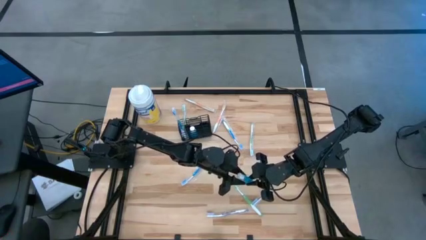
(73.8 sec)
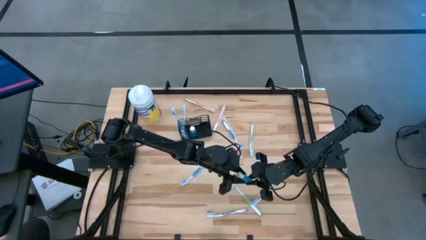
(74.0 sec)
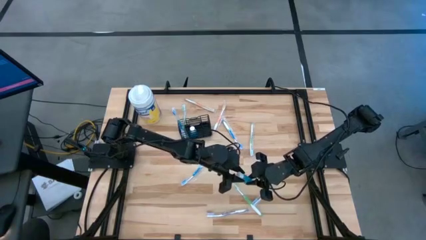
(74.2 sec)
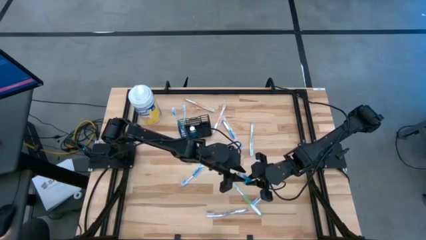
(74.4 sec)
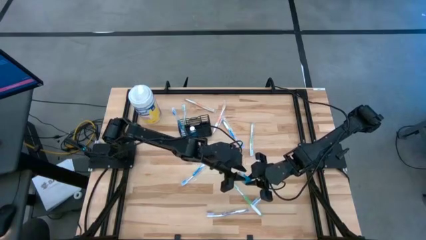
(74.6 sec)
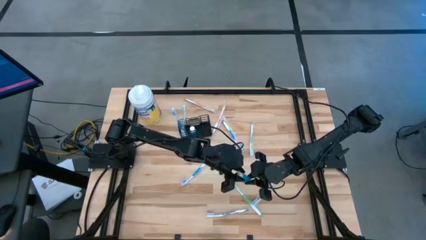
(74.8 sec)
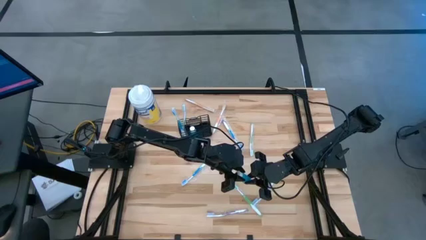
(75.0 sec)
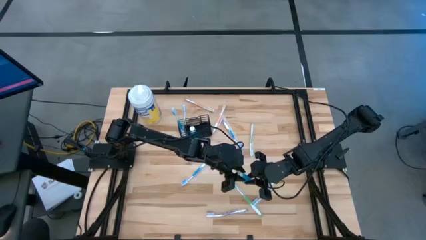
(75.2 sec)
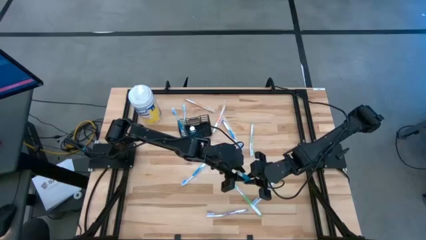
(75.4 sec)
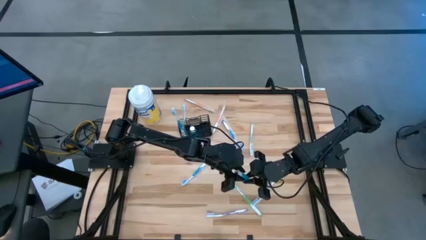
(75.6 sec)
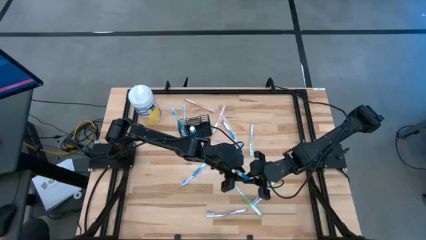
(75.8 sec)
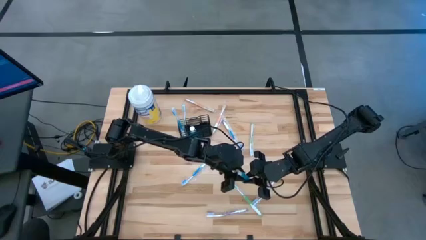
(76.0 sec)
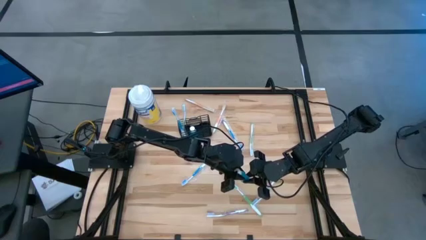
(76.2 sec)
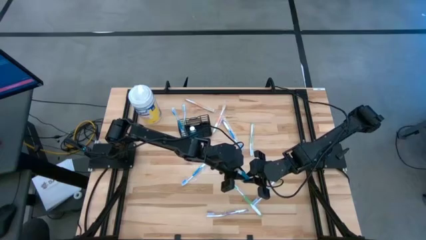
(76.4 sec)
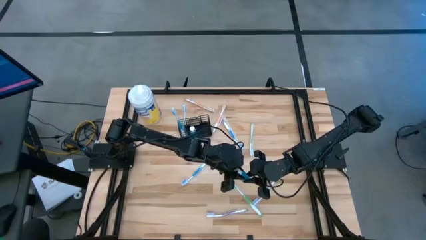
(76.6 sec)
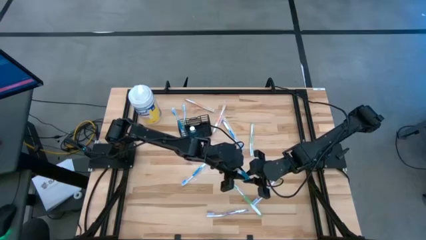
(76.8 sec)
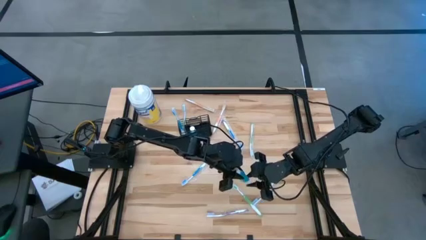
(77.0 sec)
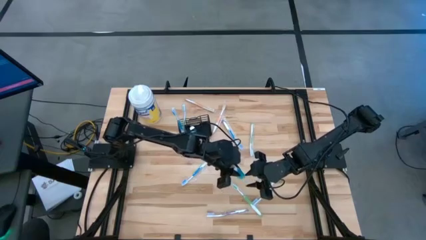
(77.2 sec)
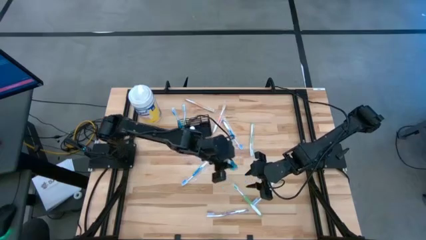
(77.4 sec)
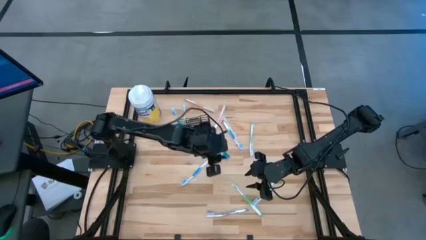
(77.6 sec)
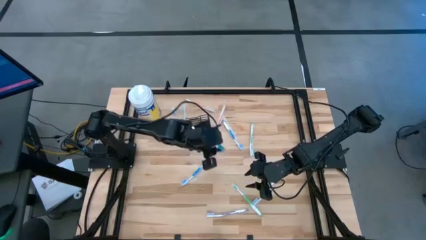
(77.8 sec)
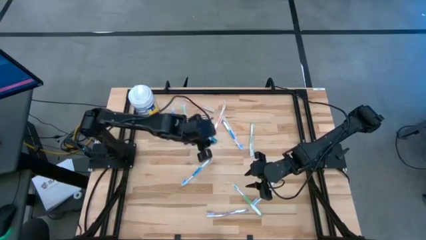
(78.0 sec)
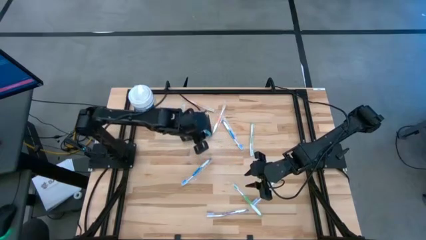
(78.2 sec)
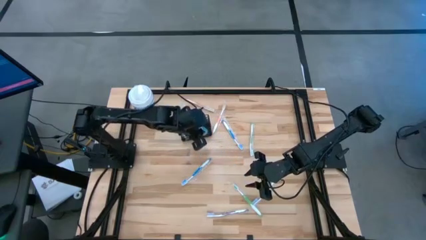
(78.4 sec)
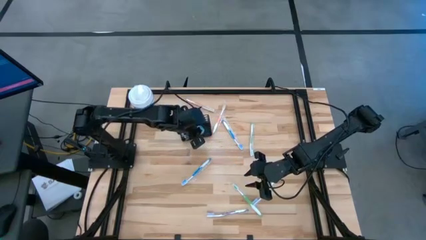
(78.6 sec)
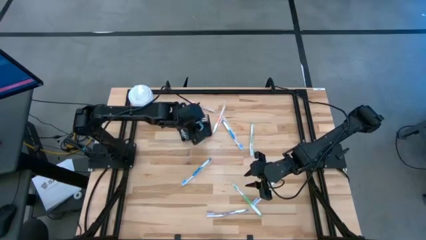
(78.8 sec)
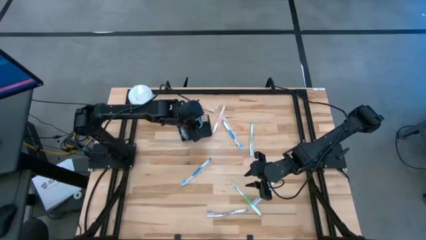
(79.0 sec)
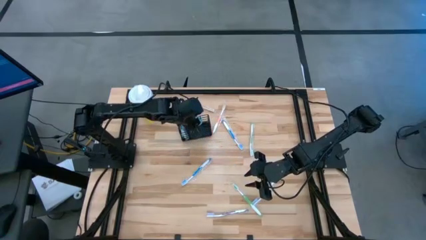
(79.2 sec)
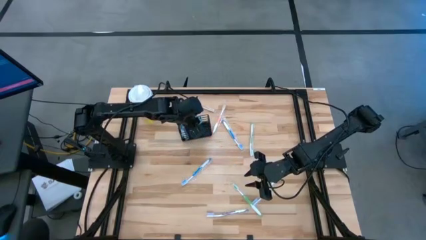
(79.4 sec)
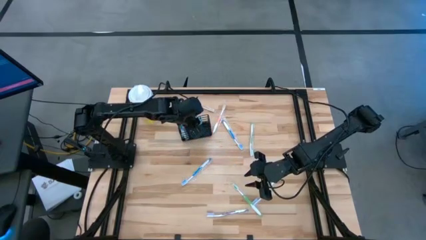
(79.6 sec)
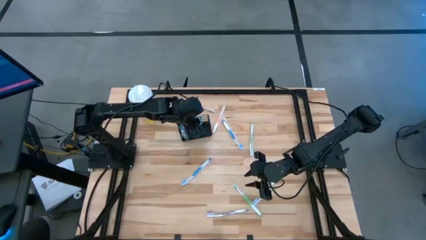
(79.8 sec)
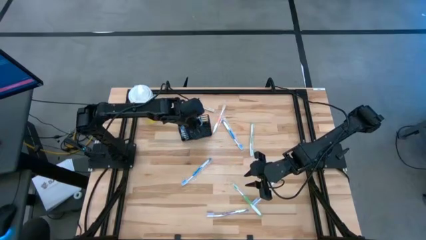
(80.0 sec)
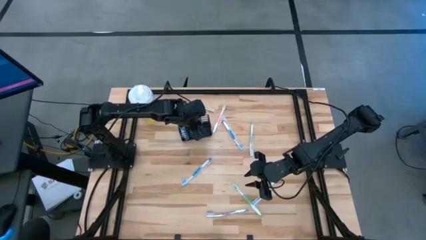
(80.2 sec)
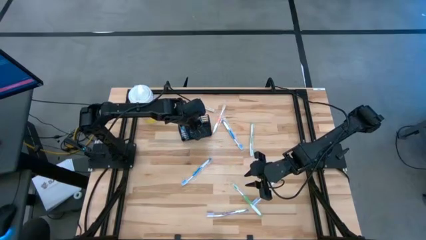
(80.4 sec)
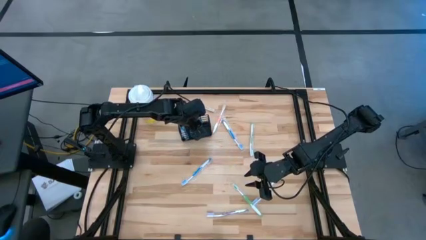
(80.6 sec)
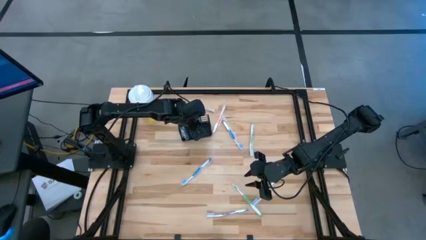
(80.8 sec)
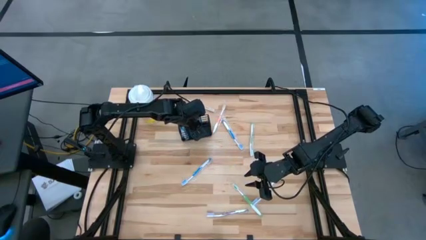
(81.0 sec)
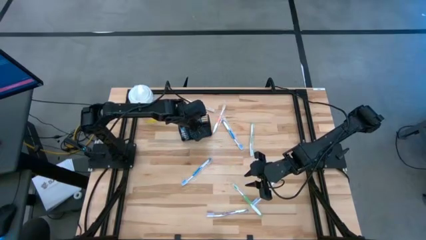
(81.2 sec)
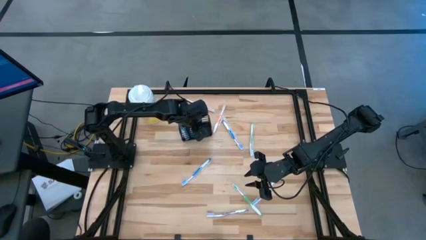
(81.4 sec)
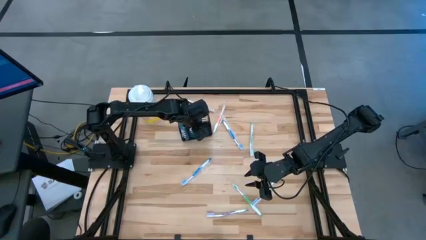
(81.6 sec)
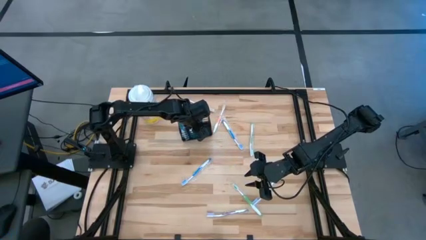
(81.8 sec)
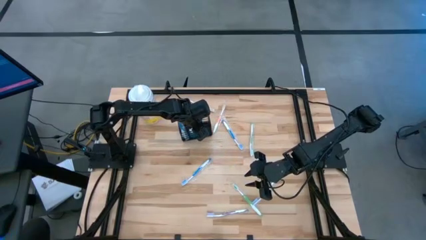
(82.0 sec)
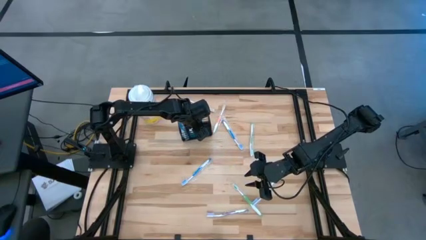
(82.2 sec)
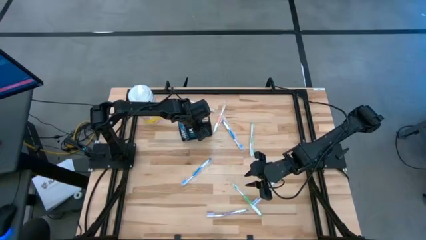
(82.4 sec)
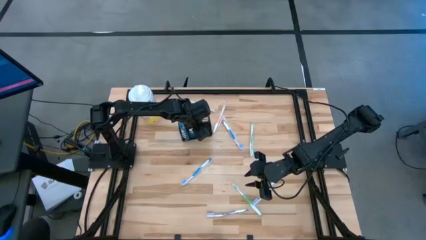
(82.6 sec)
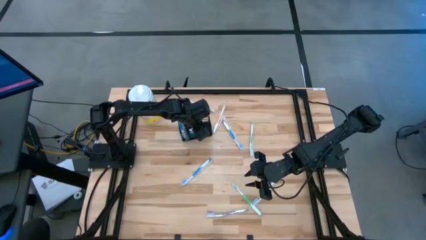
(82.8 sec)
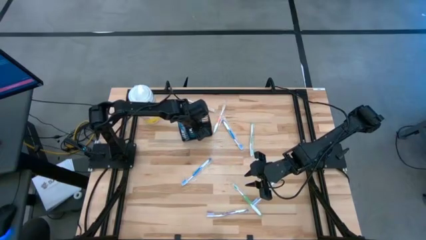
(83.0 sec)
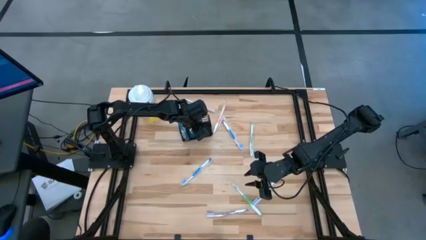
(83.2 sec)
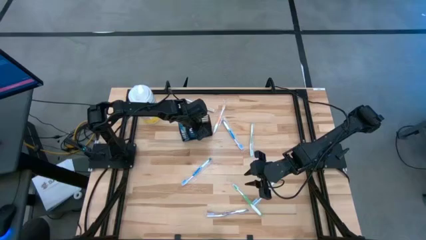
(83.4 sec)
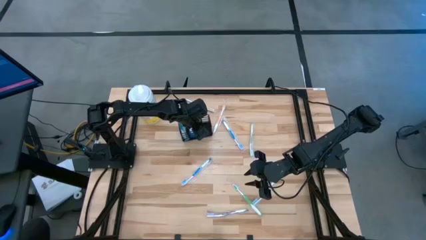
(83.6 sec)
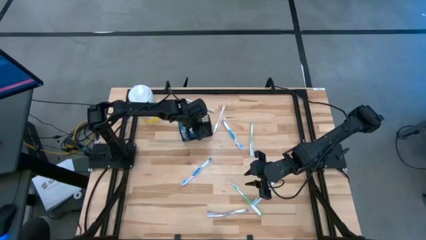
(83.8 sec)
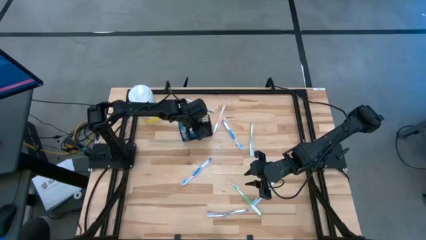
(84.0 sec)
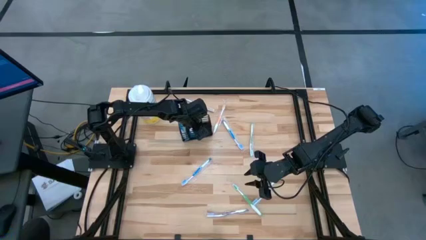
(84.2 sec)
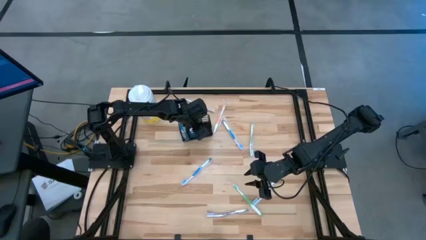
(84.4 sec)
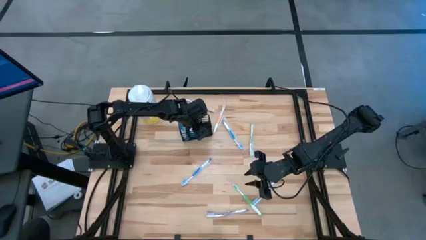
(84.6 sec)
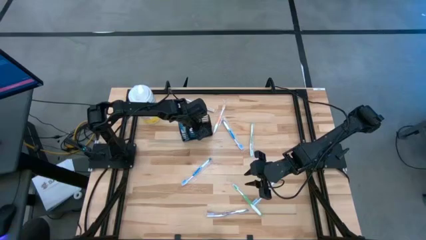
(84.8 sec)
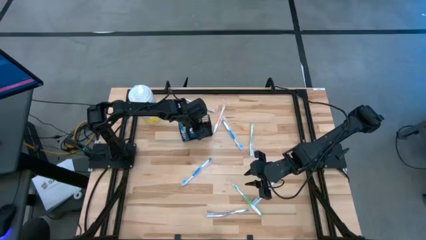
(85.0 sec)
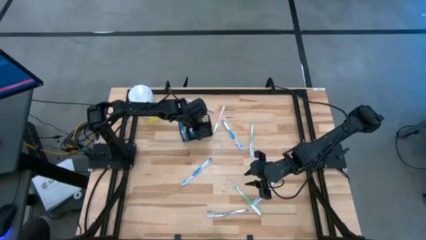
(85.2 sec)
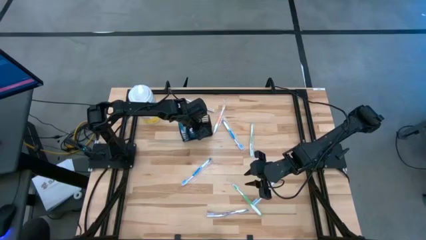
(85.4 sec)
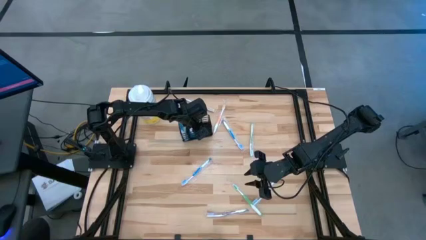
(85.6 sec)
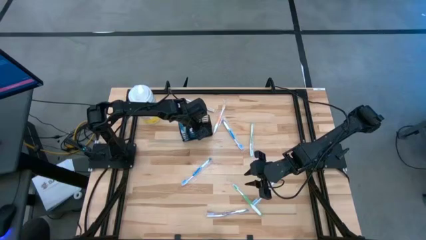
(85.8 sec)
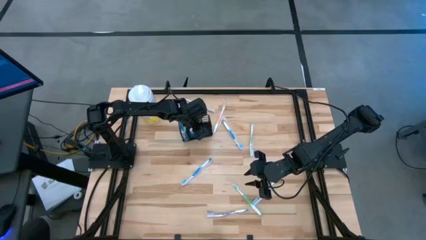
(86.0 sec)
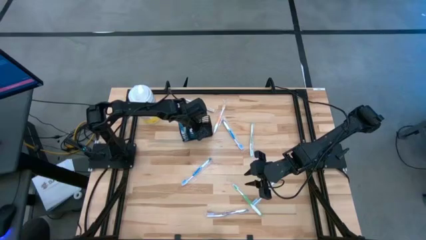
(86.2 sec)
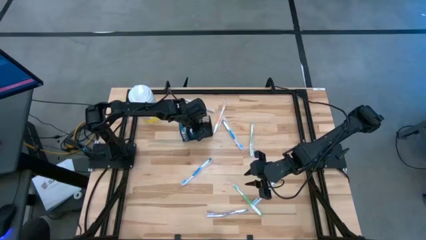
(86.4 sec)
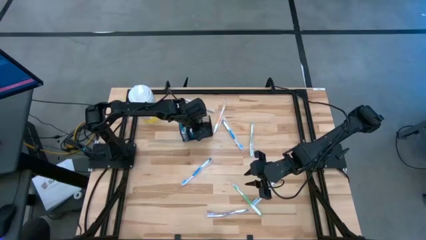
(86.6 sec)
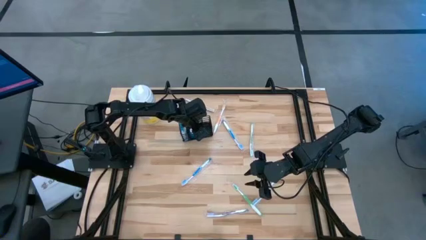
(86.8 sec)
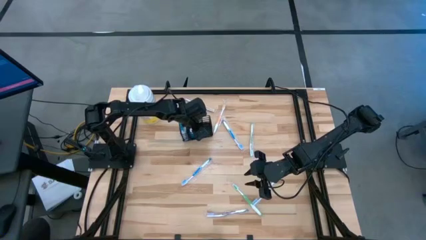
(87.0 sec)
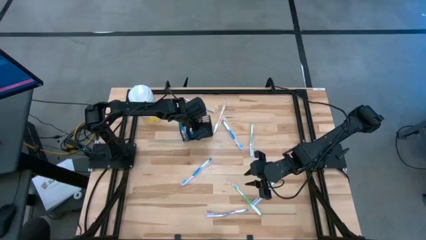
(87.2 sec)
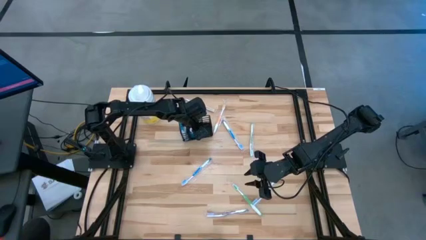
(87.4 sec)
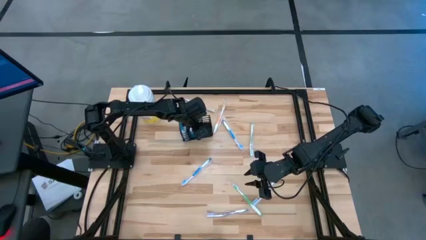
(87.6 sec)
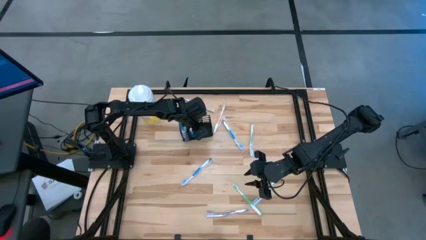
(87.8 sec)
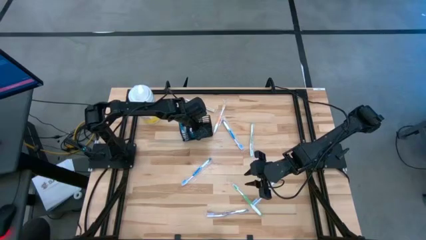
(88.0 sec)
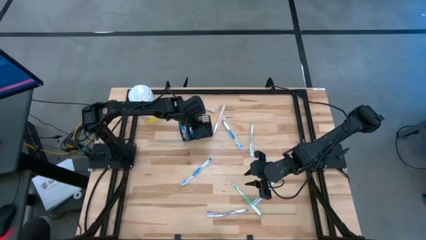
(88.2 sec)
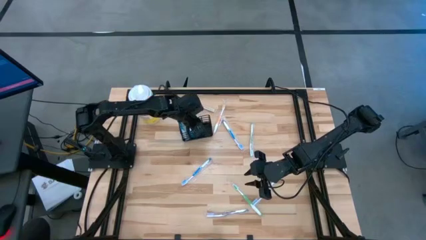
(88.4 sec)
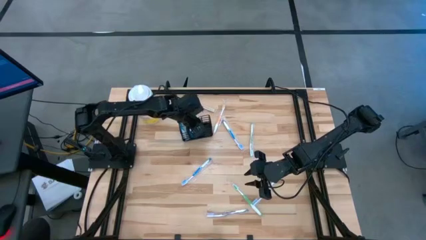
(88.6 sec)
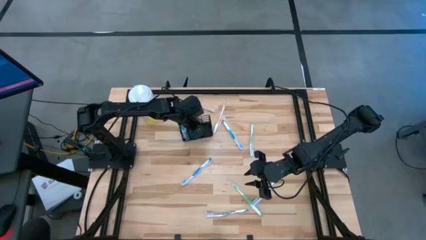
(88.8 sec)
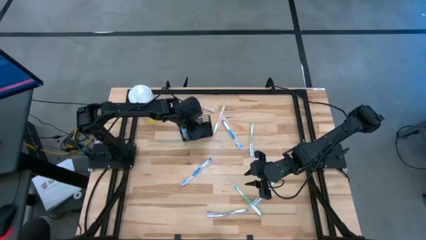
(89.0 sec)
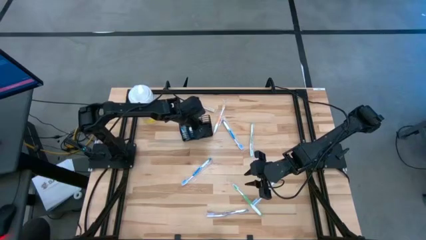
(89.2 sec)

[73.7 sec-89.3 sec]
Task: Pick & Place toothbrushing station
Put the mouthwash bottle into the mesh organizer
